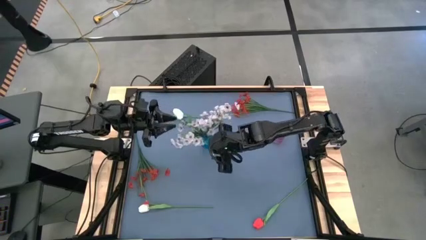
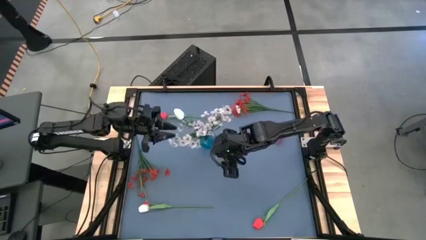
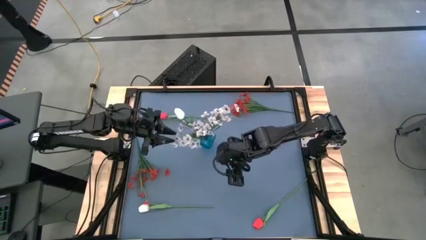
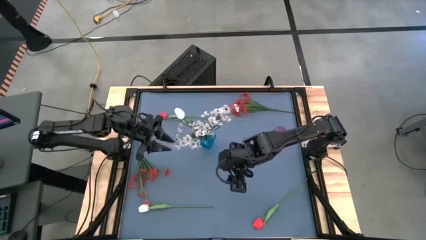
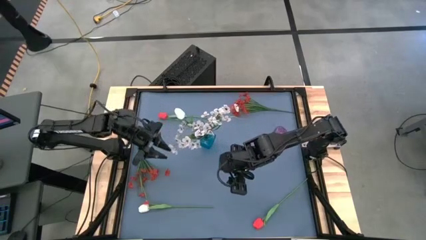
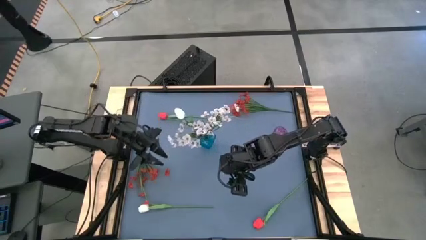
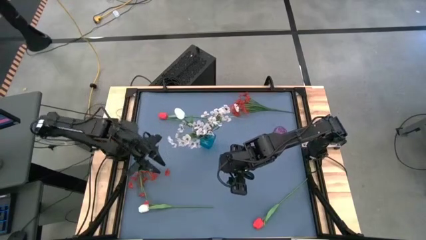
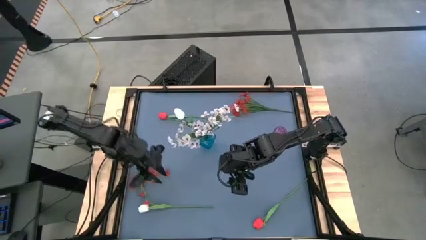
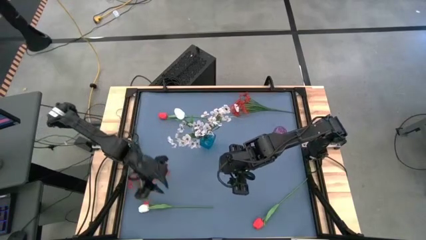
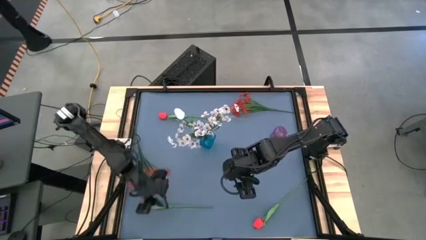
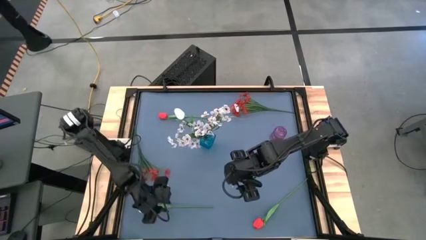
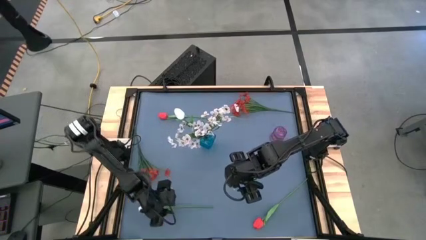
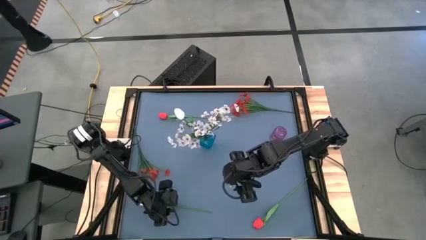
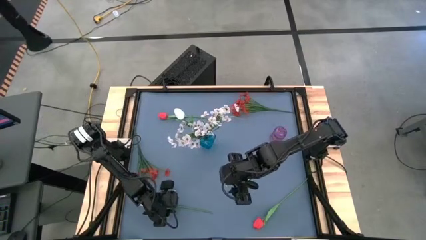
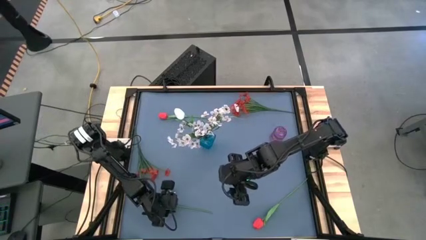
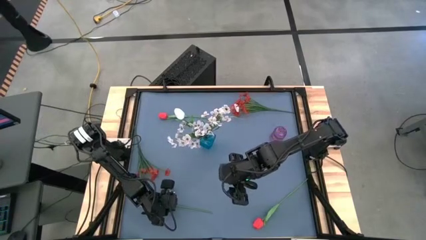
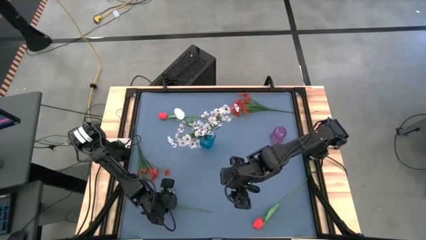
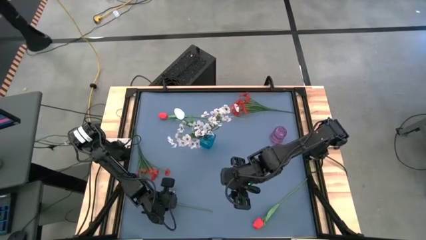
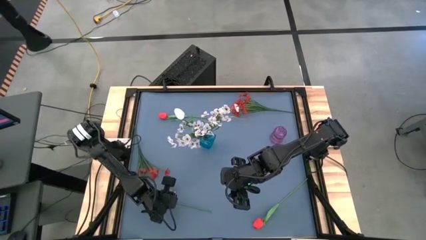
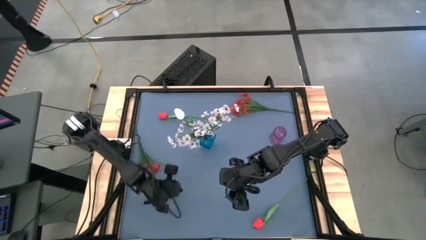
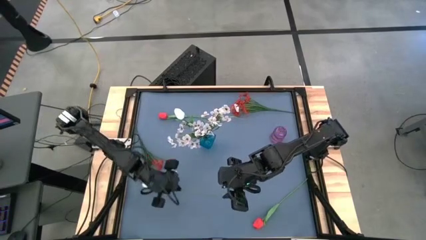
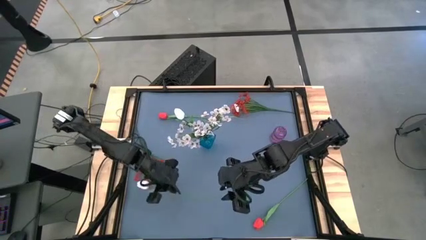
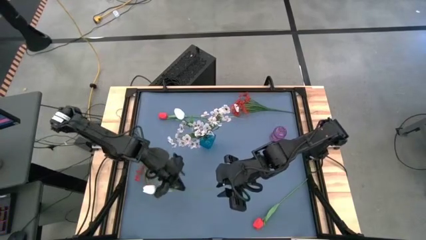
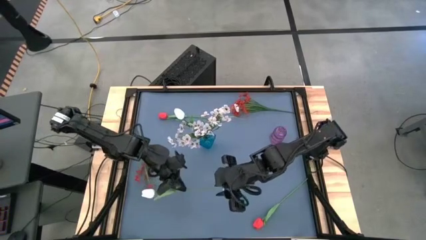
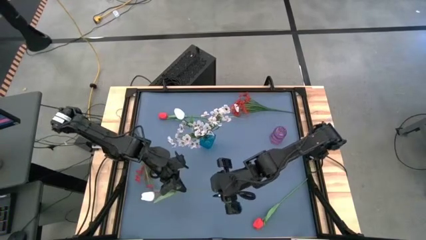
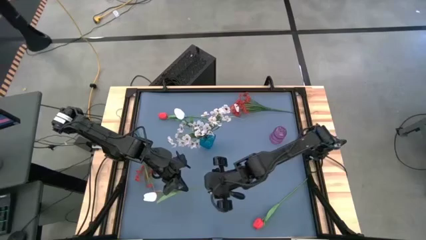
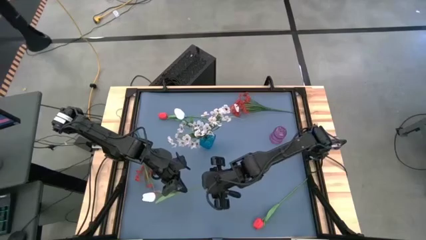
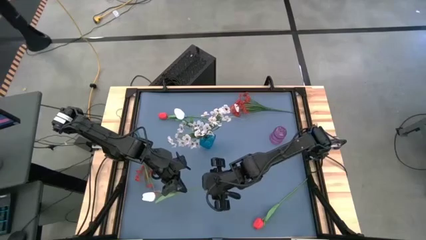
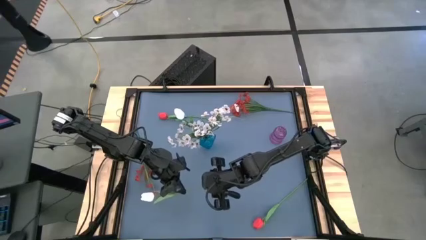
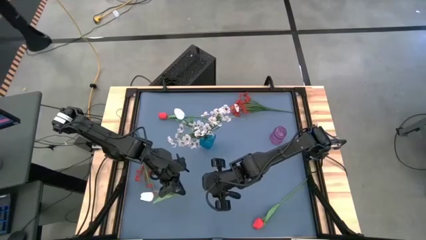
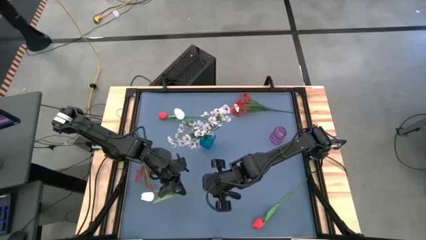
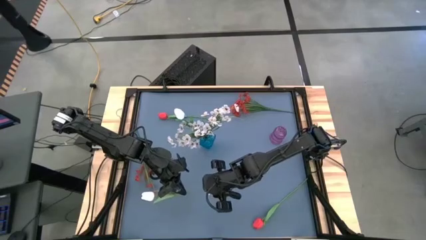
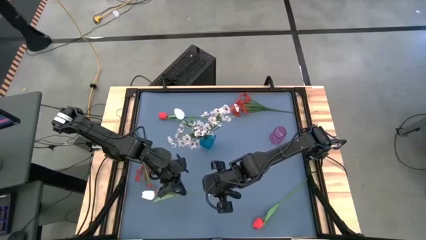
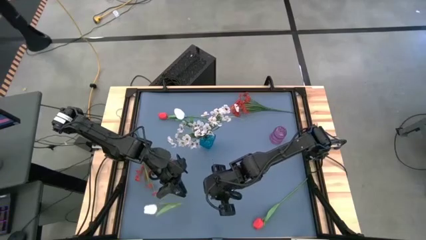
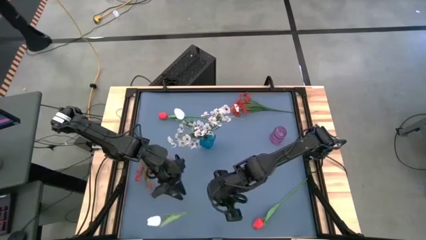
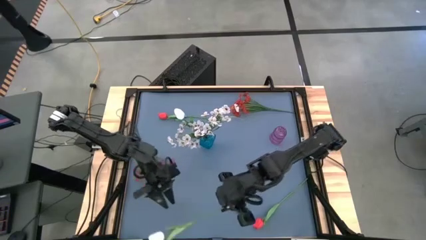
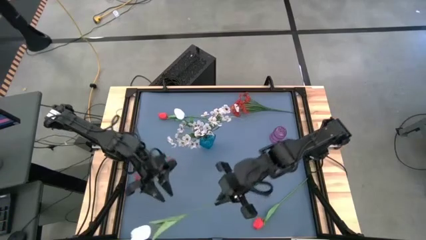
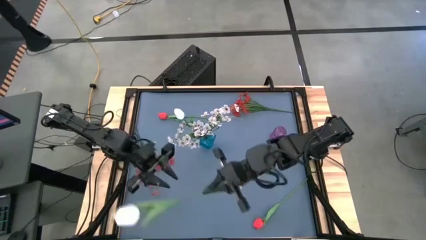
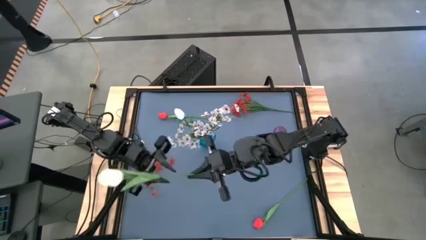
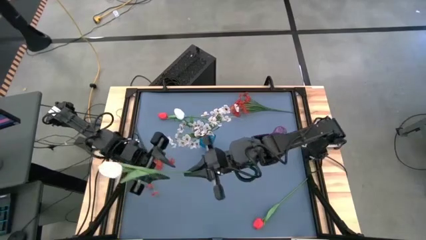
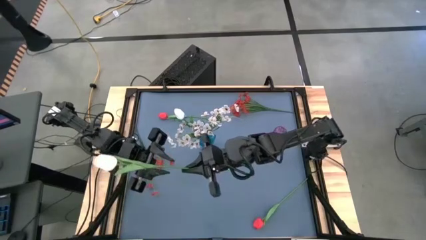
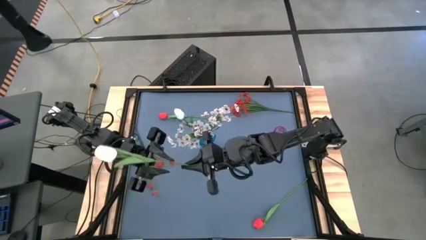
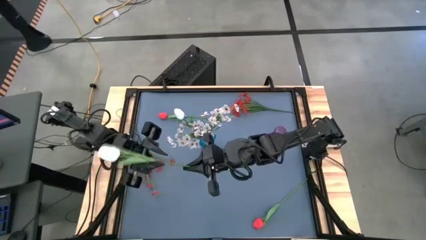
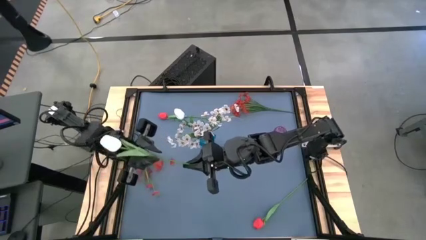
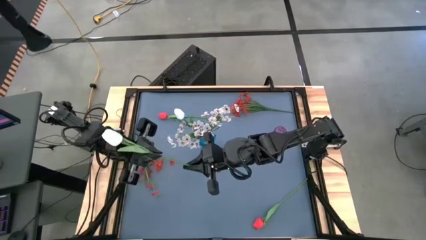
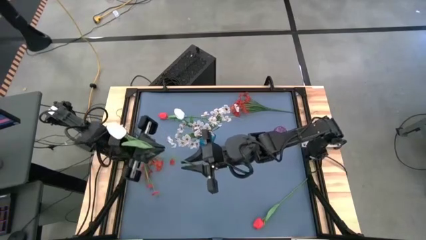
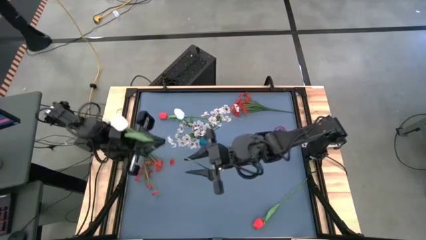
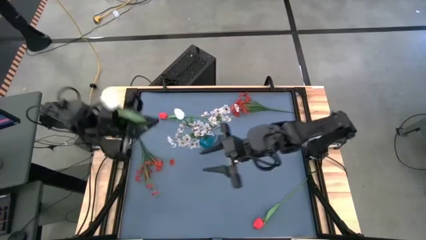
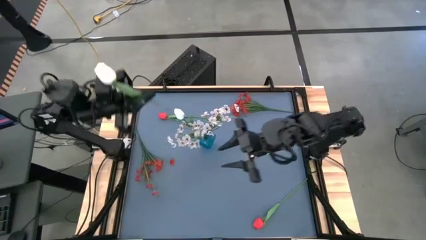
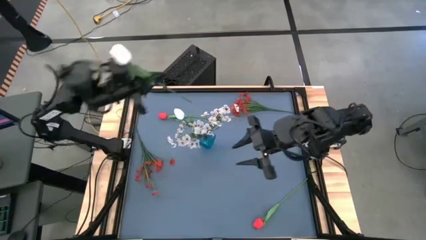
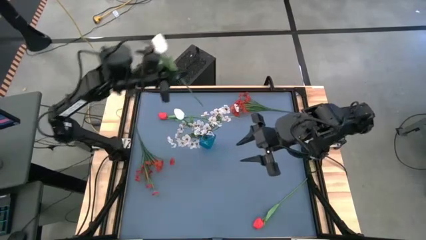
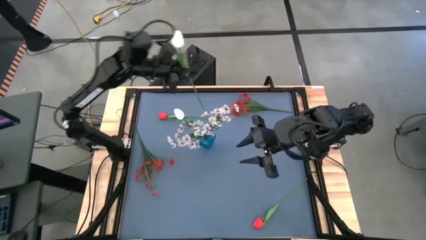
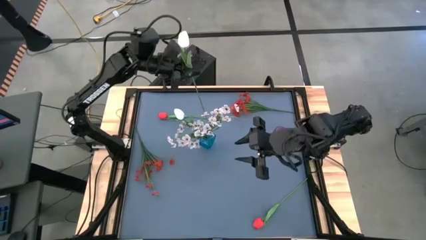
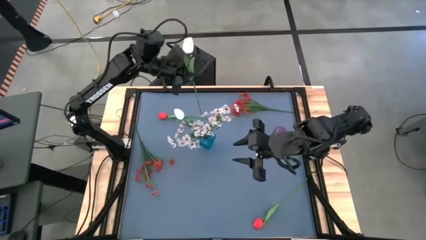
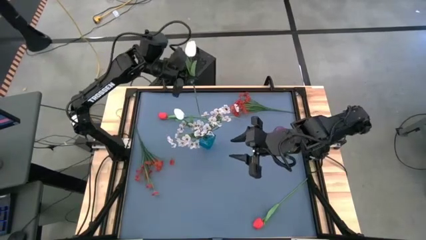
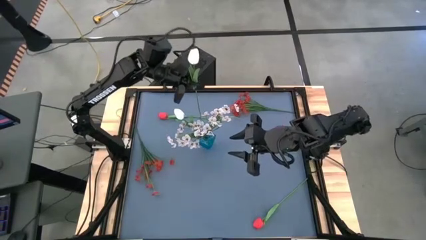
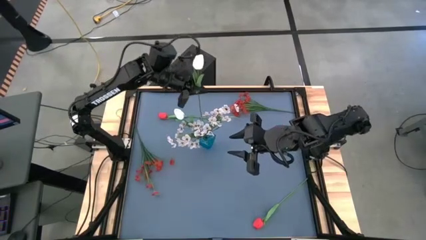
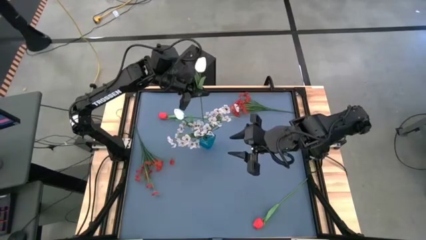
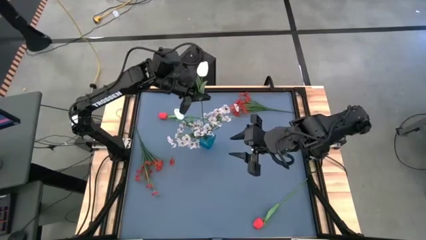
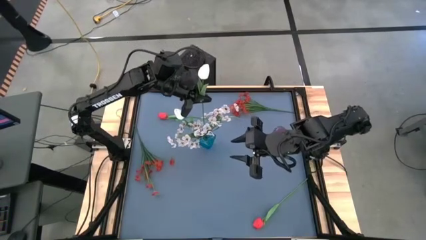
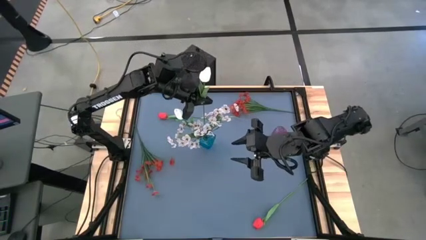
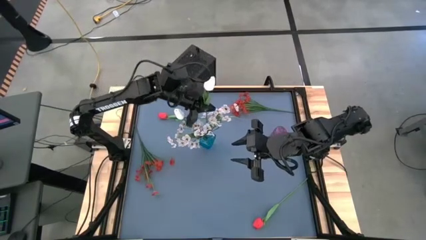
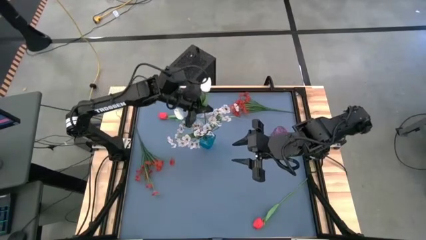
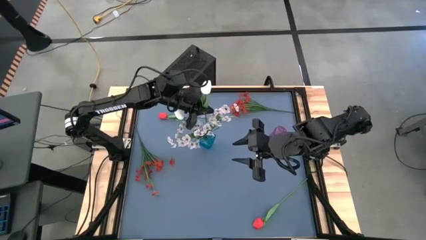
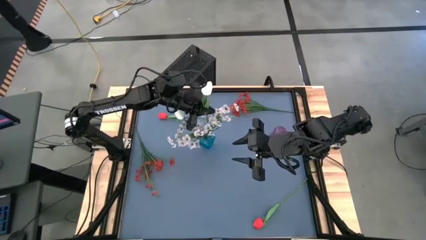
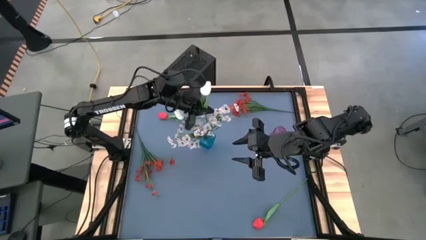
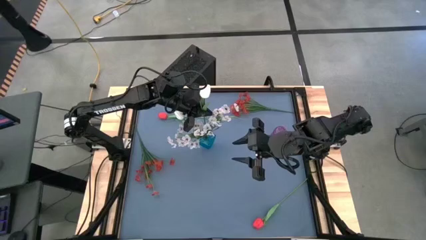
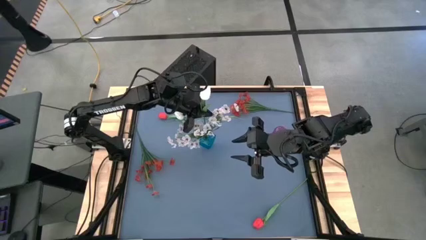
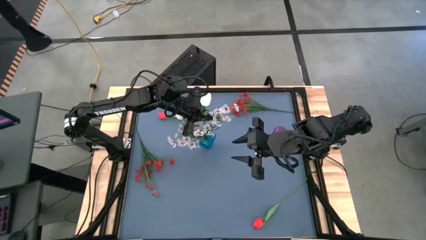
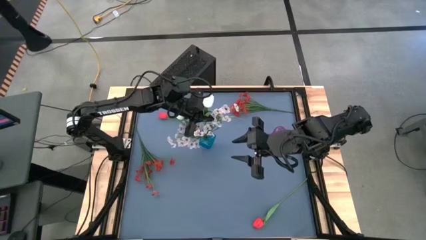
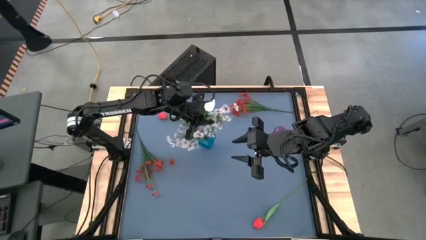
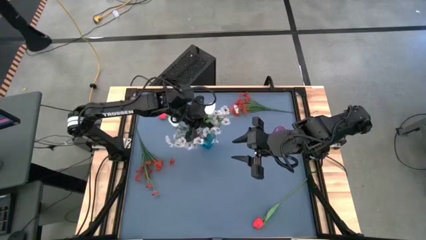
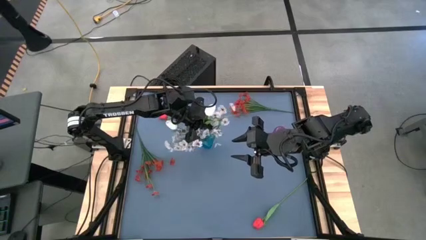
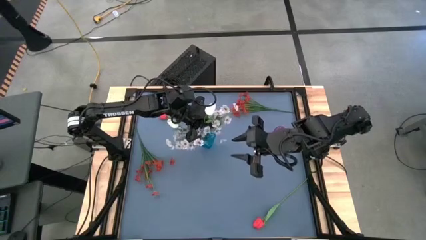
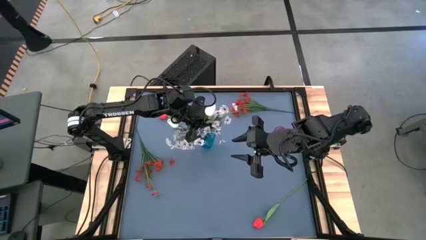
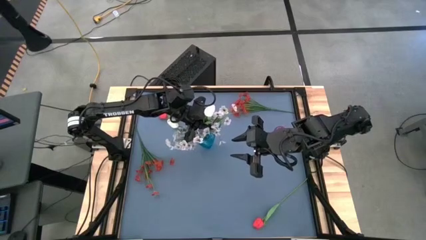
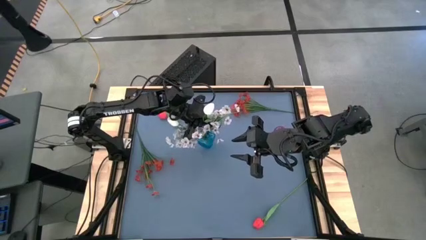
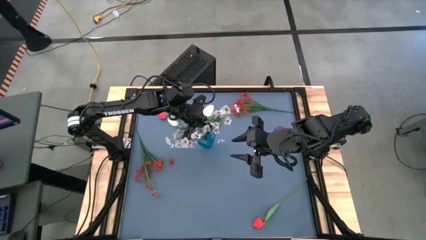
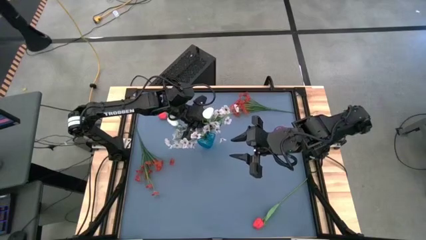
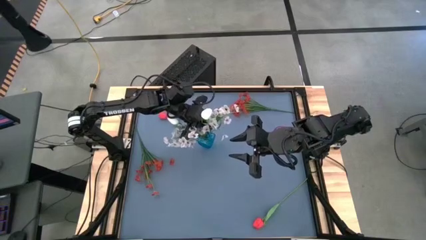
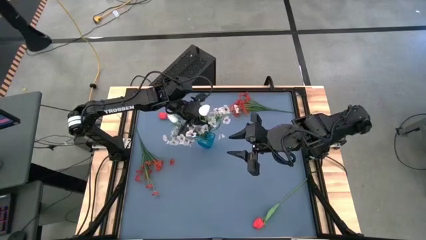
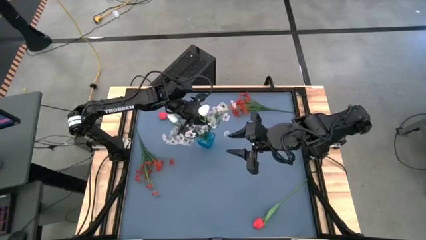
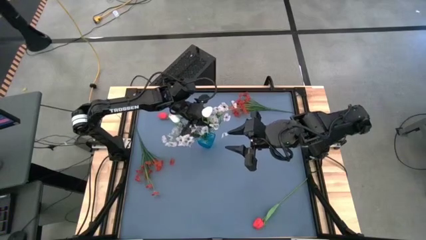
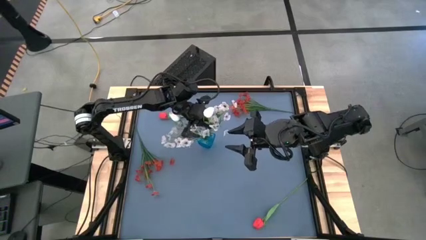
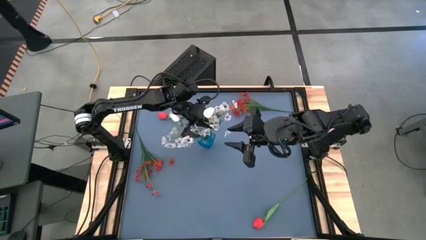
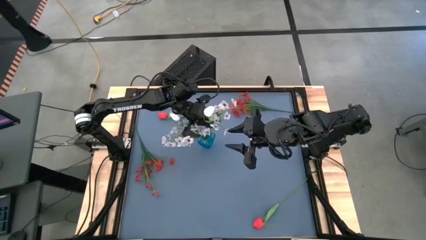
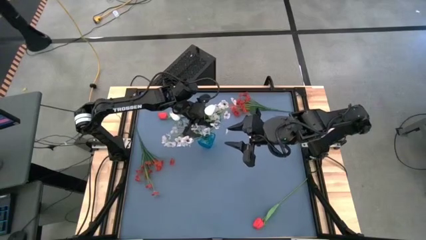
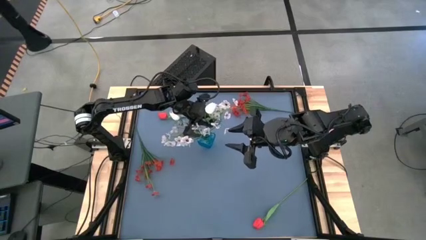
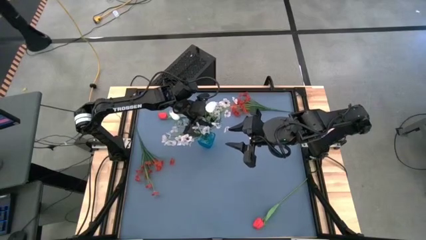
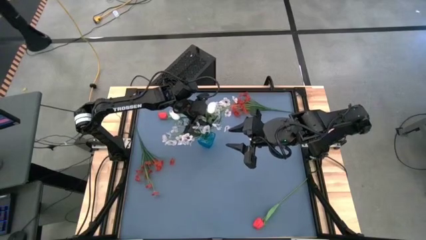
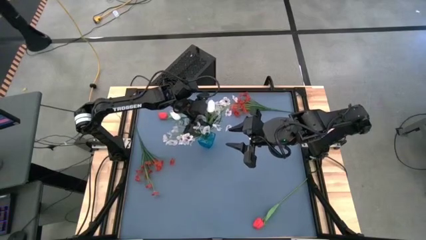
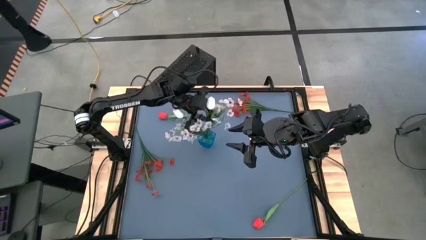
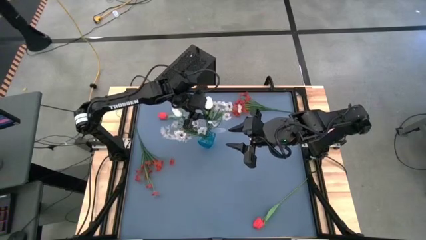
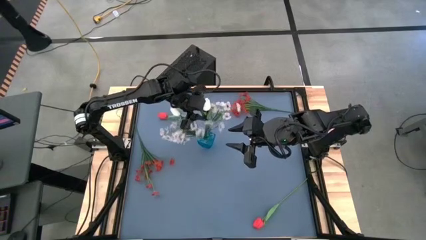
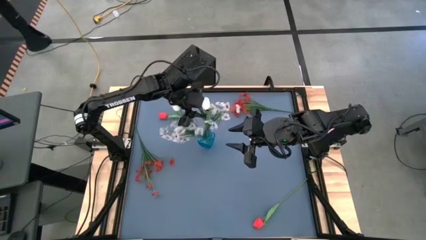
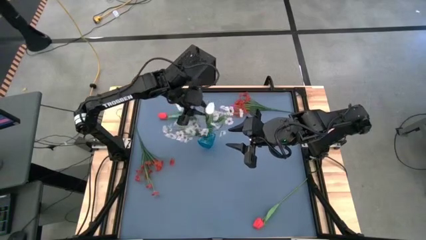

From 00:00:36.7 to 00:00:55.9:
Task: Sort flowers into vase by color
Put the white flower into the blue vase
